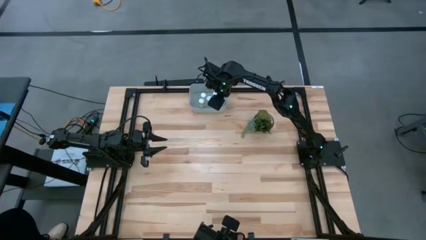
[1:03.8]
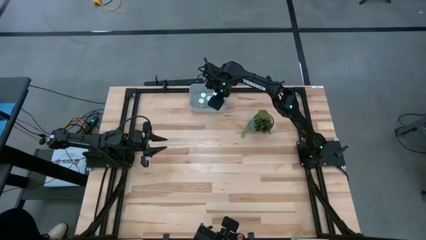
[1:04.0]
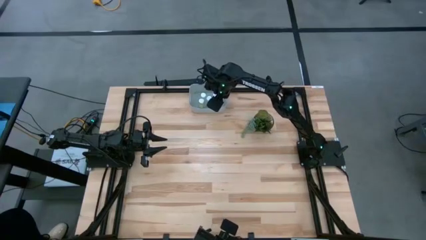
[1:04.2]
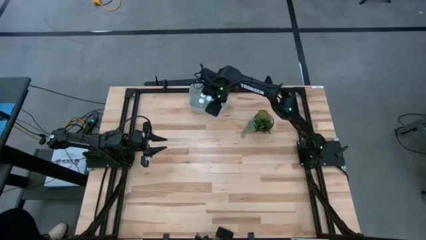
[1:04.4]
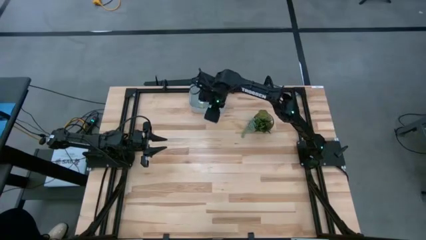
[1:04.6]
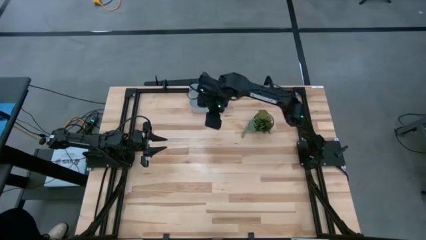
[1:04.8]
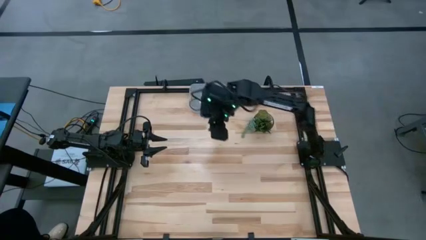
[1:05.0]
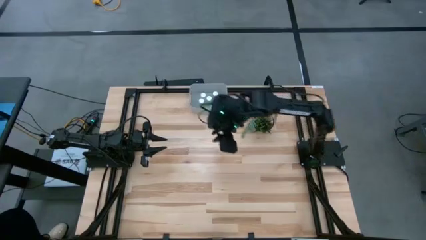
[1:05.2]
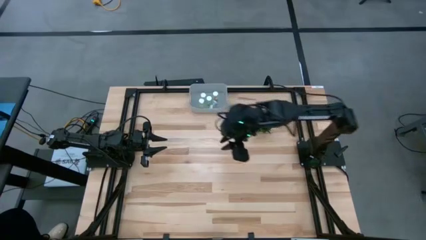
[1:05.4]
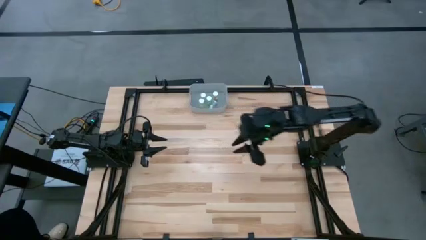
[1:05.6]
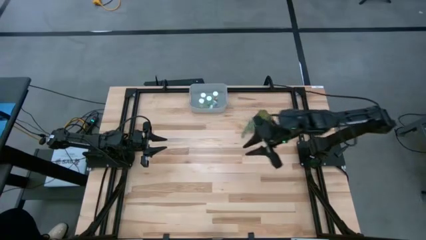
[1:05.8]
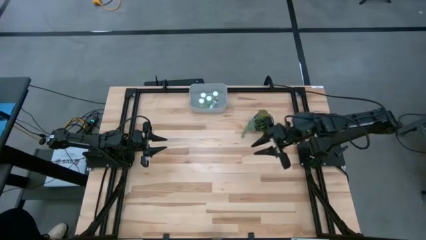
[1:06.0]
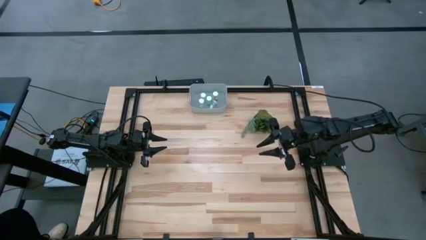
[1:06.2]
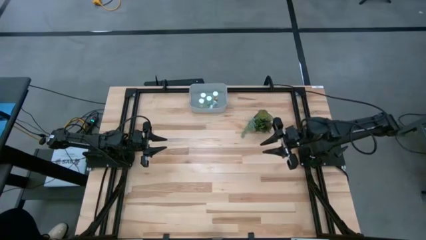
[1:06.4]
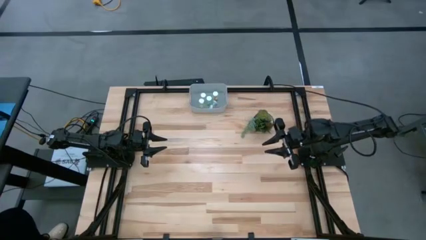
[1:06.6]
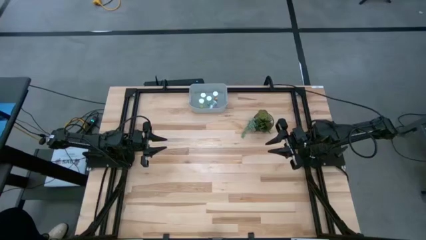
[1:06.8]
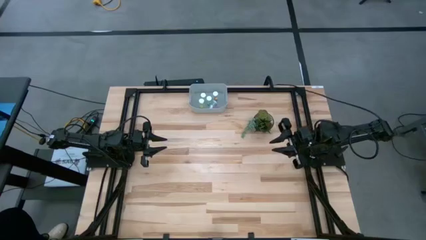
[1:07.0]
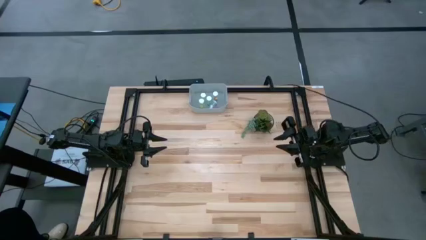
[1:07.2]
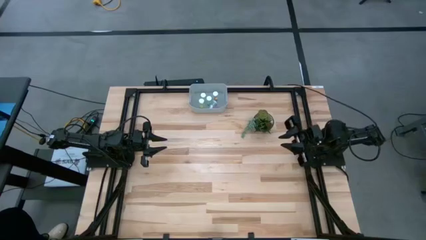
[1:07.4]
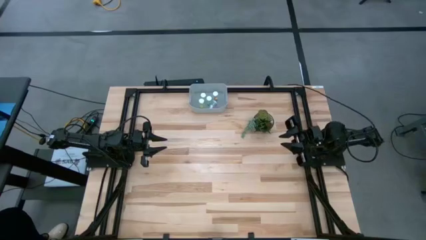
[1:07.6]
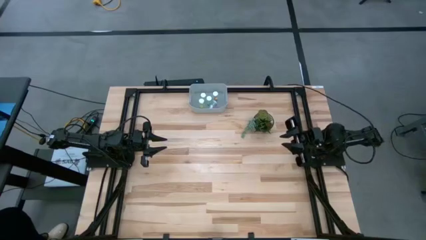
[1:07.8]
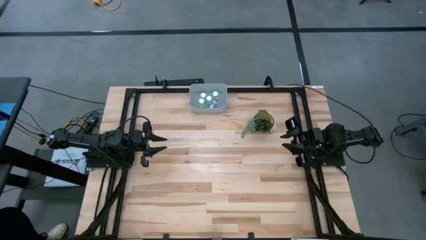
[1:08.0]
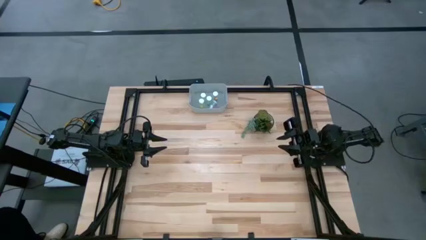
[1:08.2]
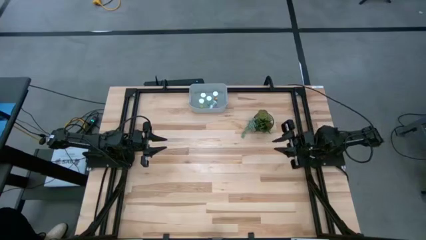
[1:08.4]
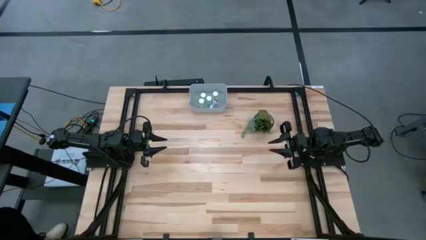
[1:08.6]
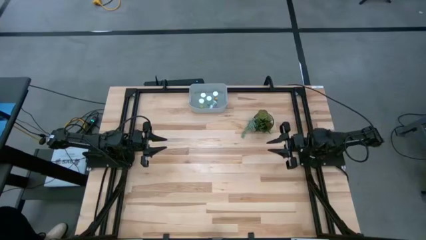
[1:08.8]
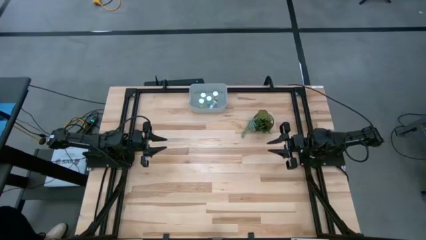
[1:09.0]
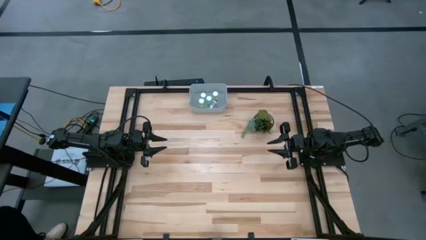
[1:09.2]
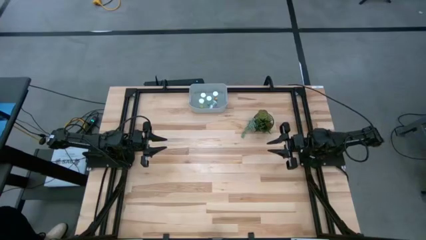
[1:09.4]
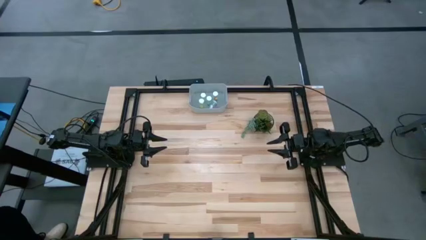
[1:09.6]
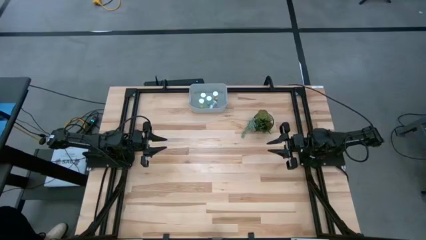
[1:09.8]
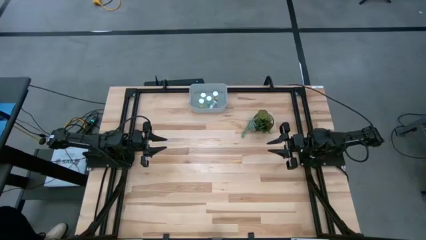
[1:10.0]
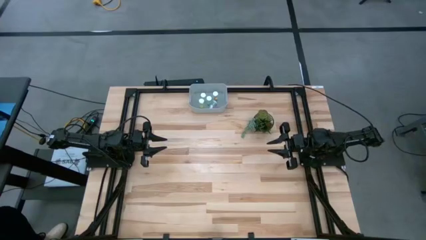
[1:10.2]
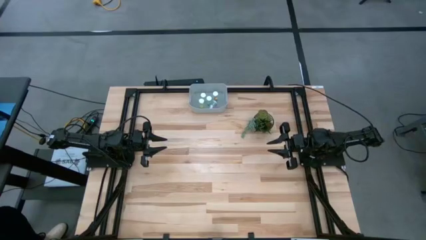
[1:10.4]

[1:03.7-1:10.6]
Task: Pick and place pill bottles into a basket
Return to Home Position
